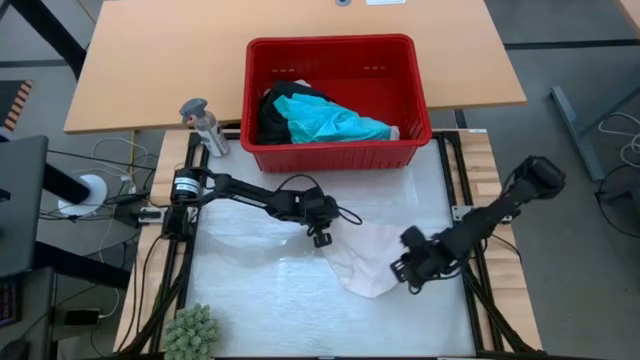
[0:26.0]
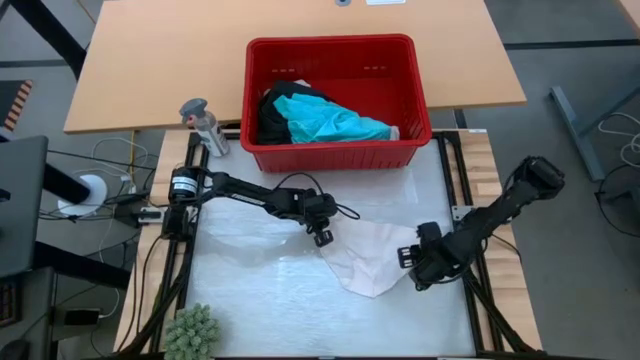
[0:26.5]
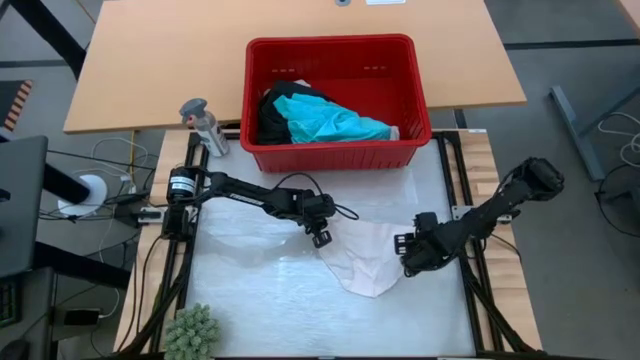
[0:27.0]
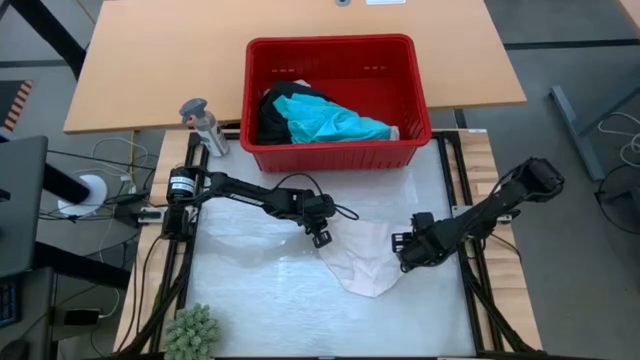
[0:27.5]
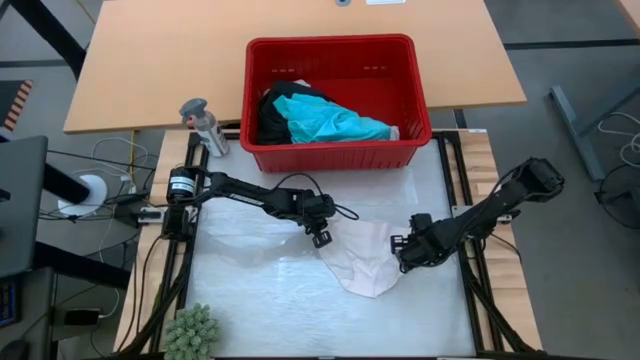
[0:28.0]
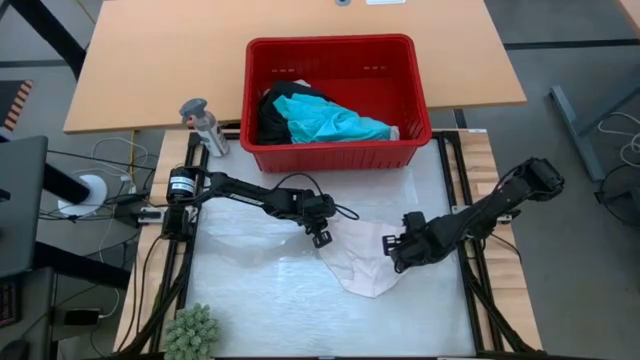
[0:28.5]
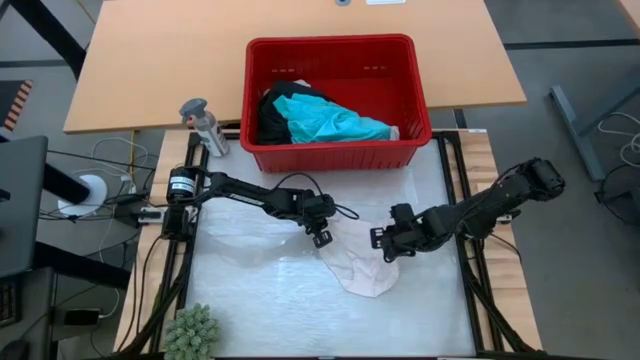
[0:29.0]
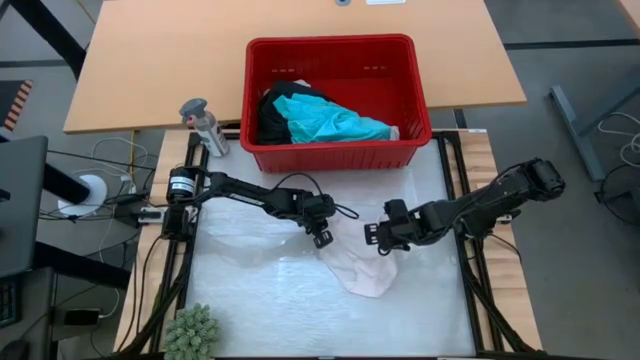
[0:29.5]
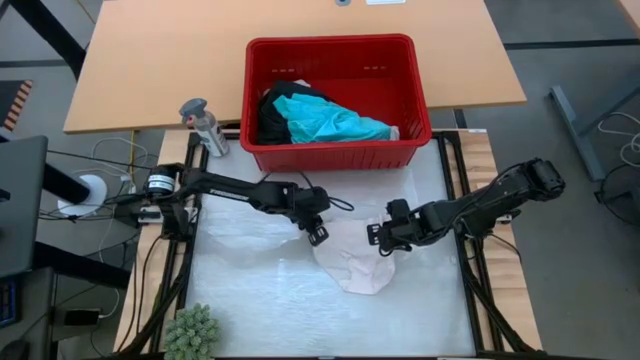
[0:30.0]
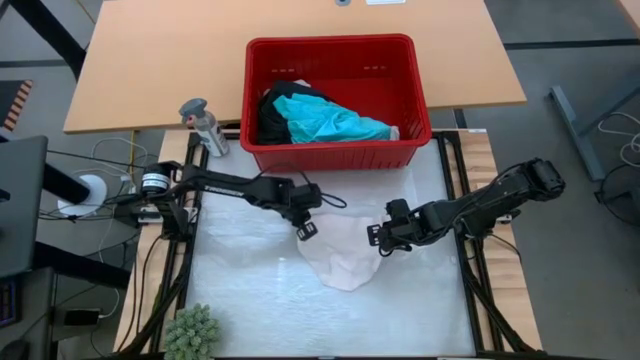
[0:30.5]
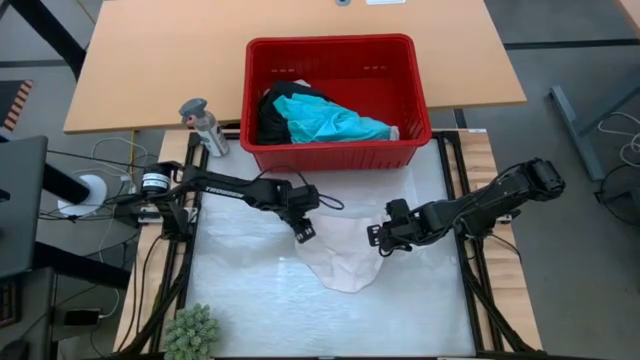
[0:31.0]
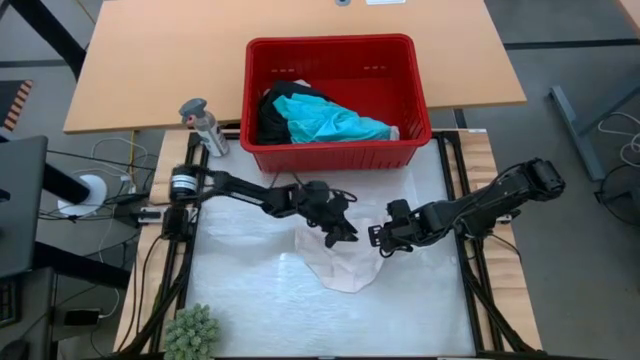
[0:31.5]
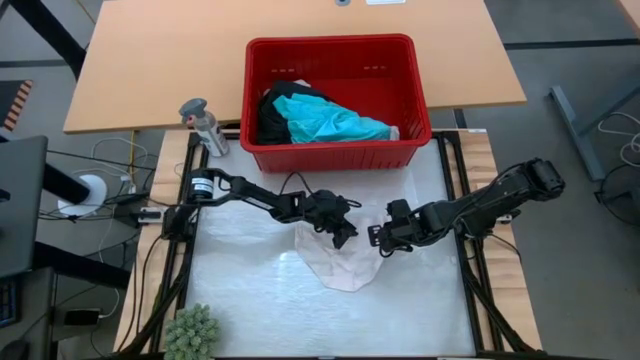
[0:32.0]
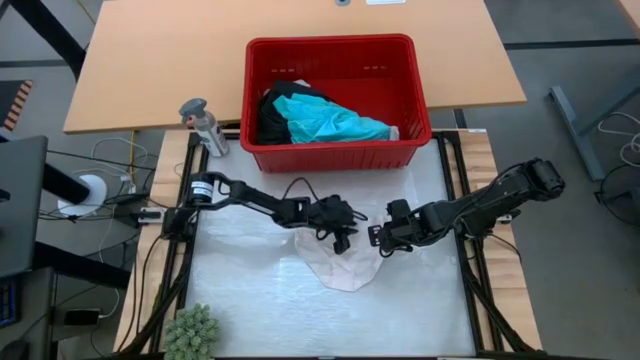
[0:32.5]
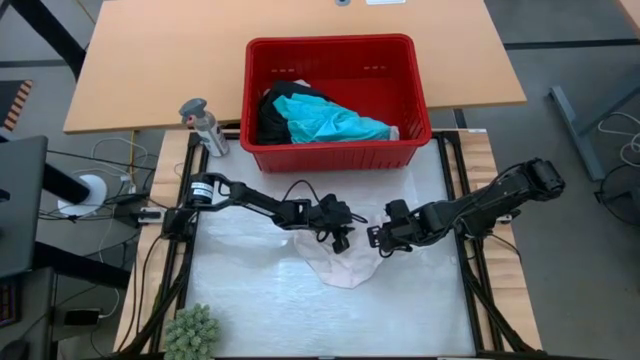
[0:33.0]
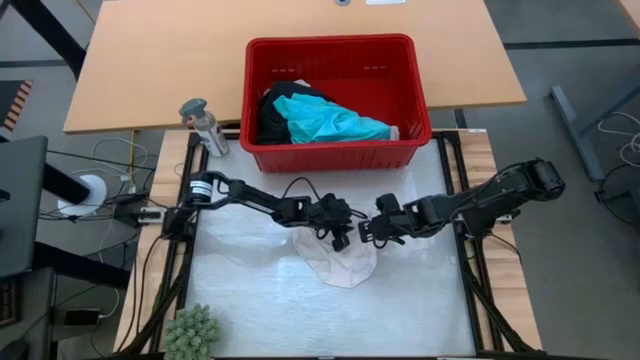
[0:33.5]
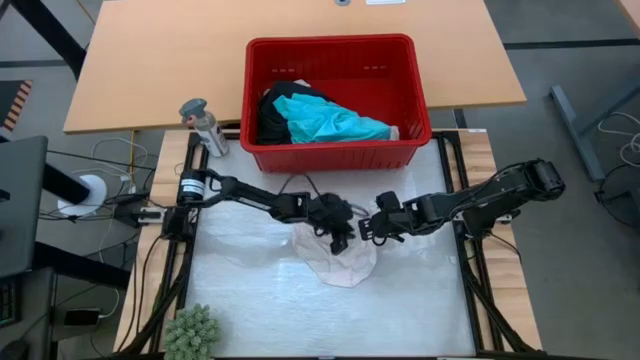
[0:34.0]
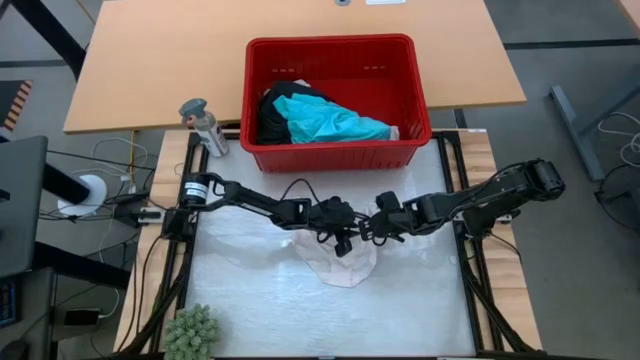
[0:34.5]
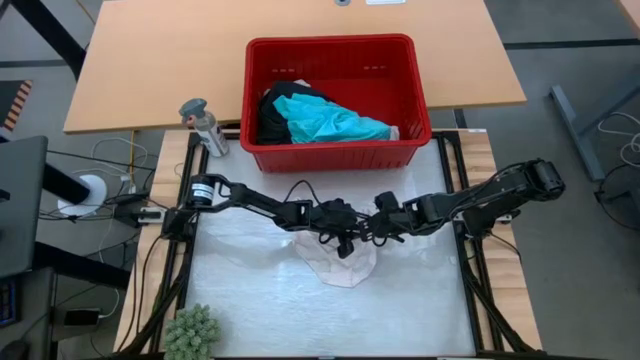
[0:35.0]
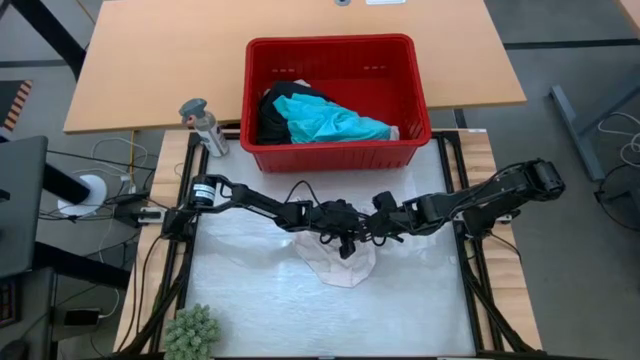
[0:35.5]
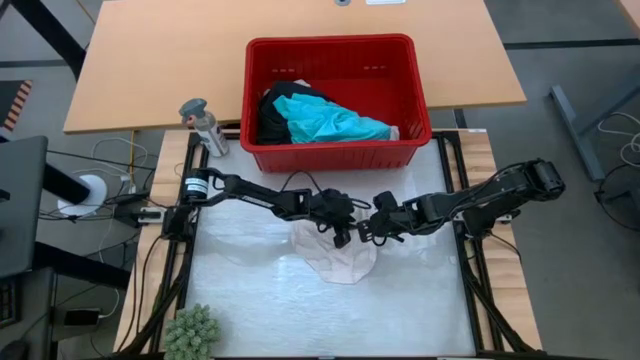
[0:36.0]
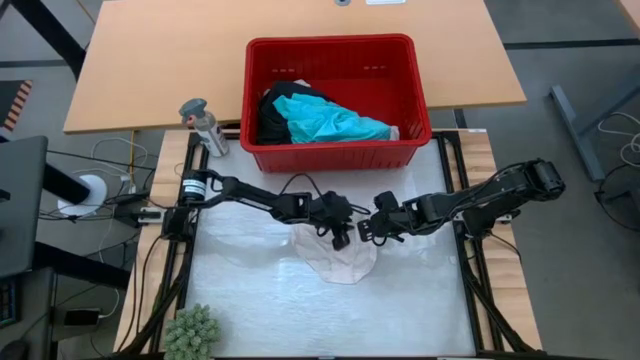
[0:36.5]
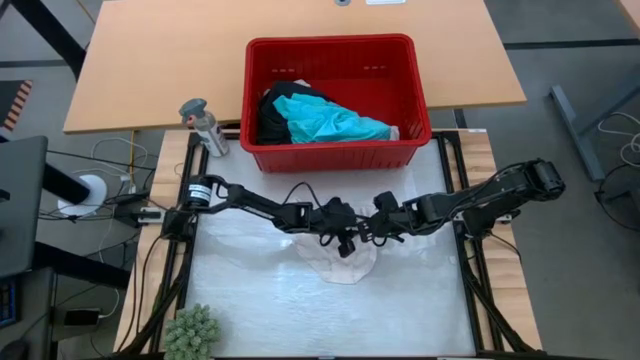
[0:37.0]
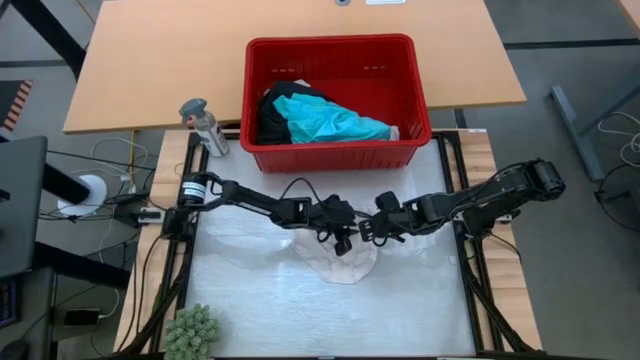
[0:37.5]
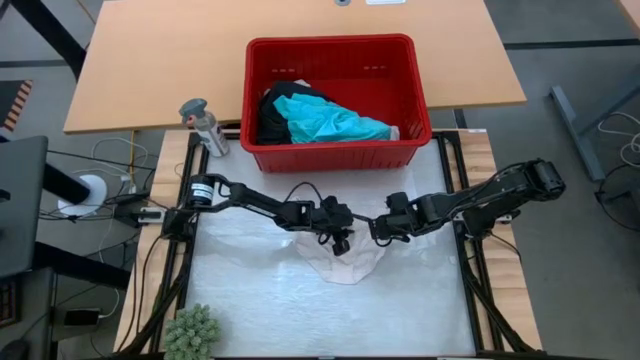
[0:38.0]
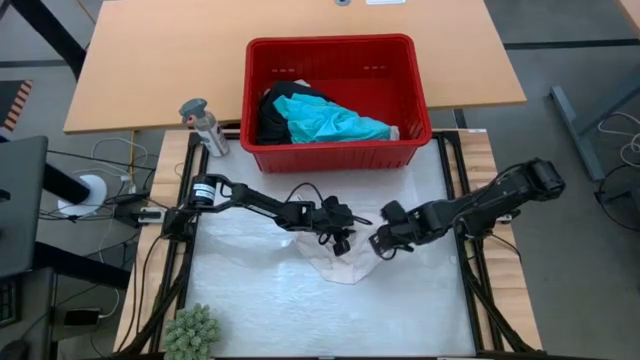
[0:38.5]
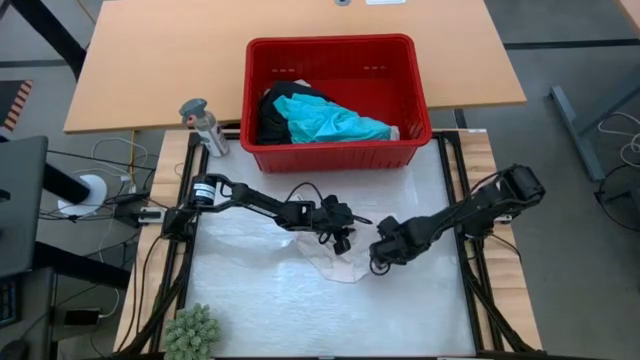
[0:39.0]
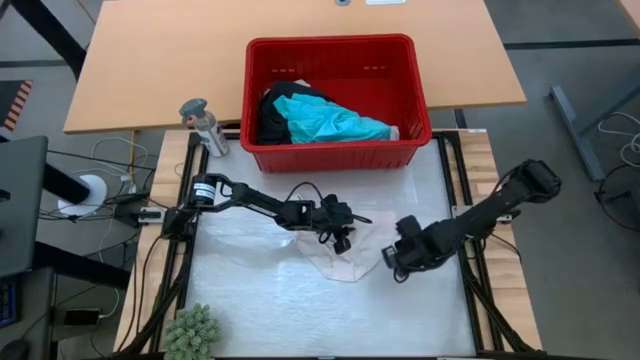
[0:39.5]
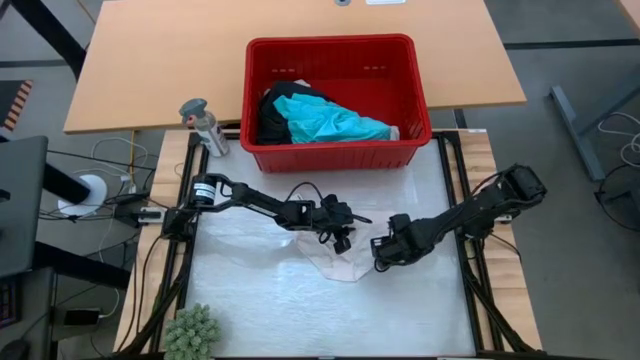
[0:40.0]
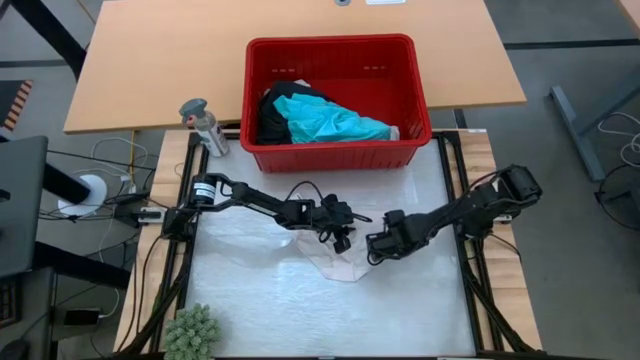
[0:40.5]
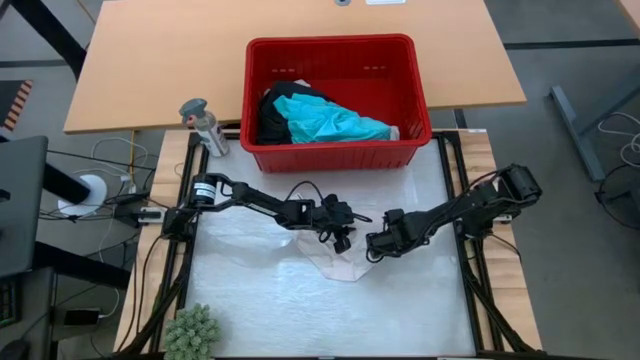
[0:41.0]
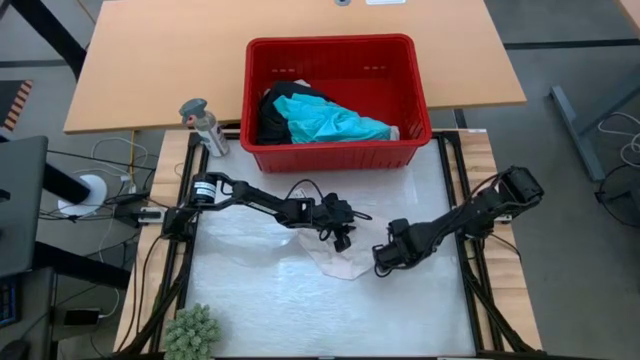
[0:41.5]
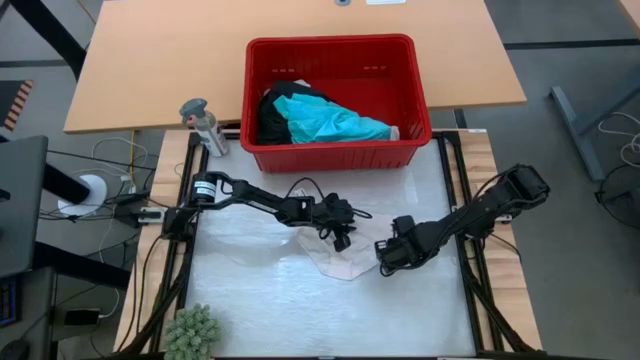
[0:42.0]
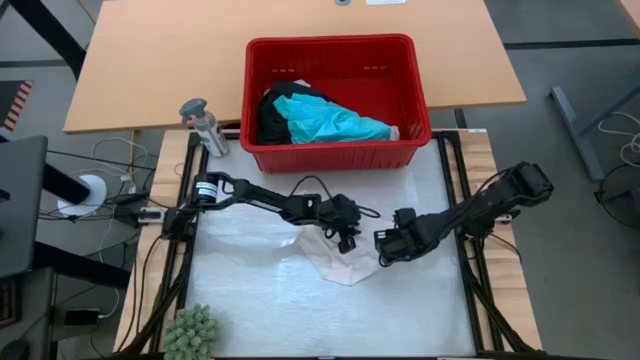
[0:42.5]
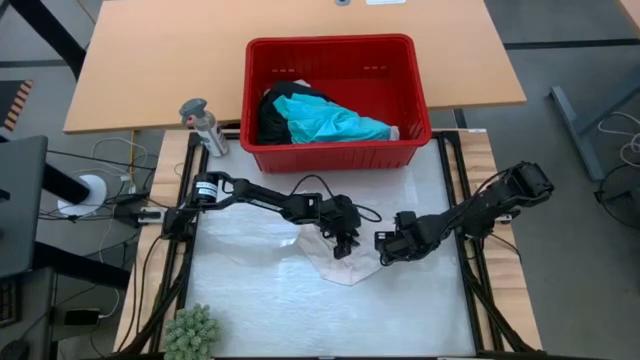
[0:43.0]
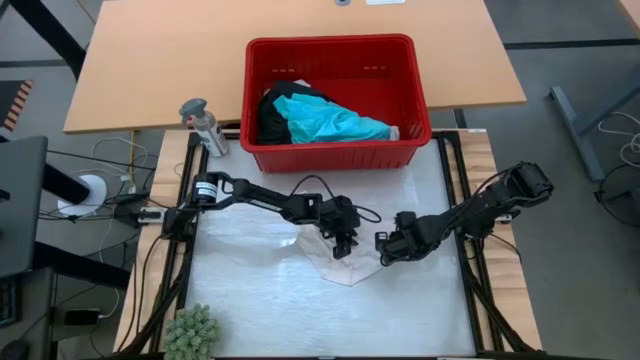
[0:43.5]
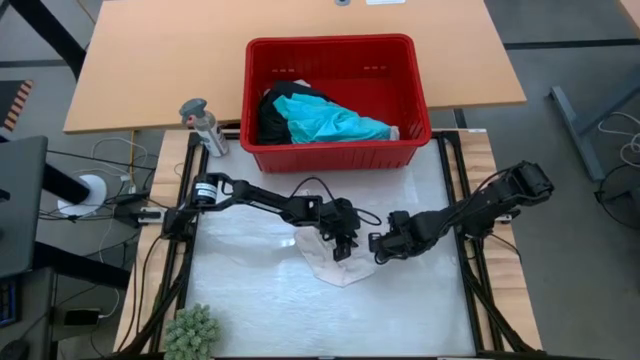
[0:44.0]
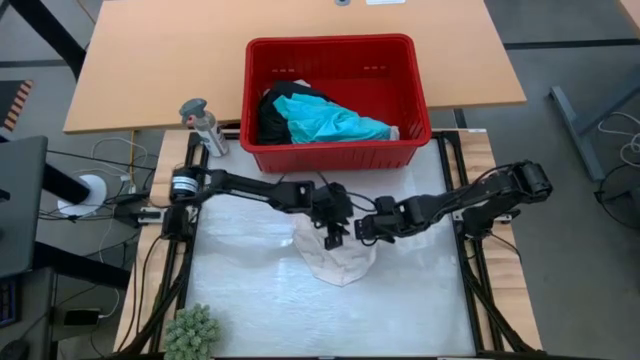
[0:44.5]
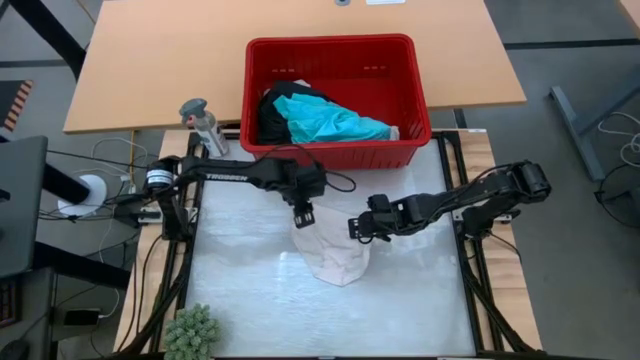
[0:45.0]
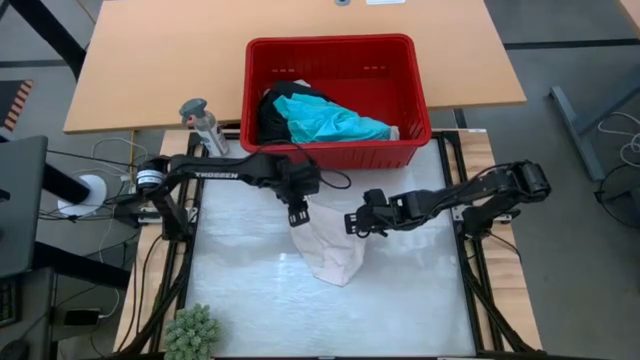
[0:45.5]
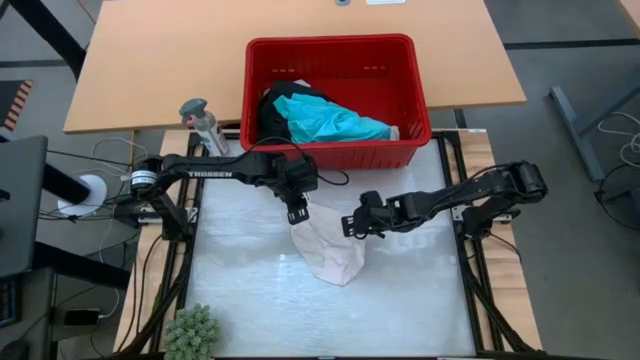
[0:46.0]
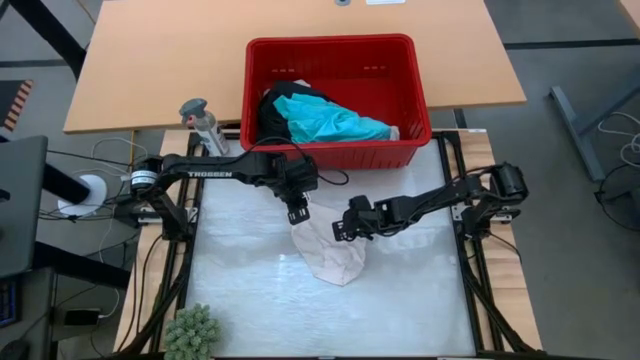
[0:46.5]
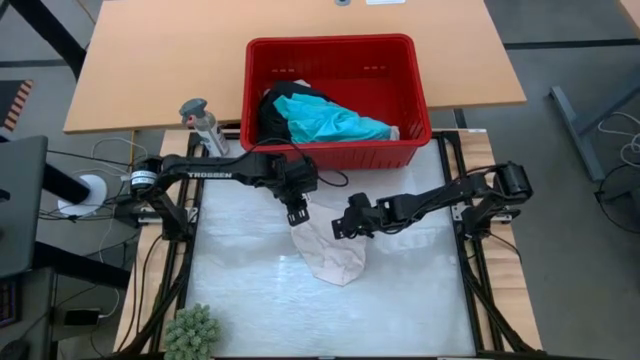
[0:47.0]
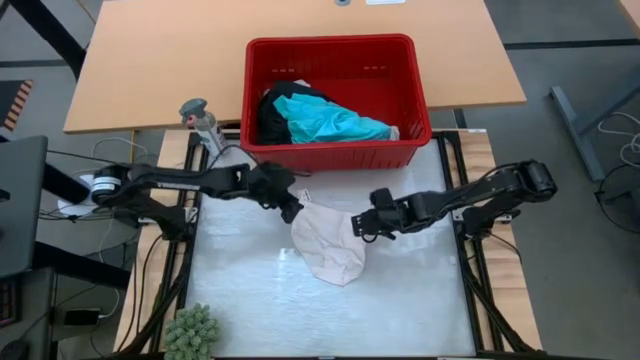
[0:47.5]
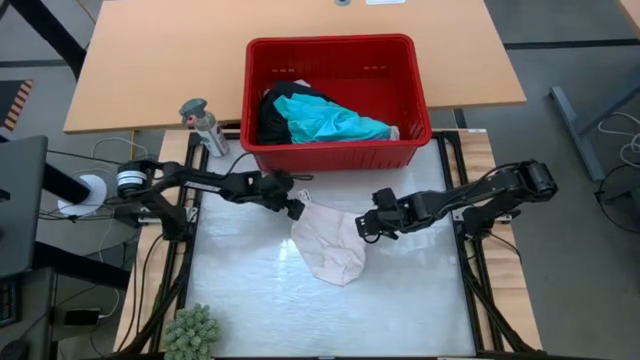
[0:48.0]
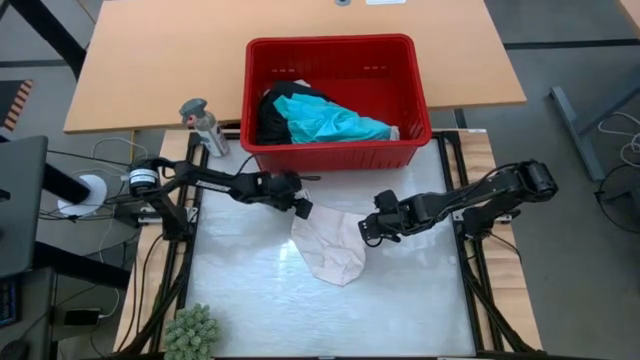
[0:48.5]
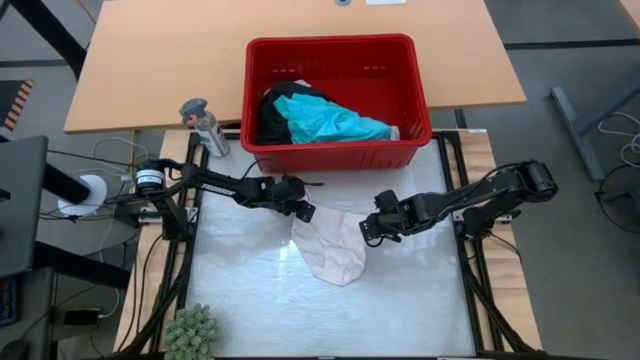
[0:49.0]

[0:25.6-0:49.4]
Task: Fold Laundry from Bin
Fold the white underwear
